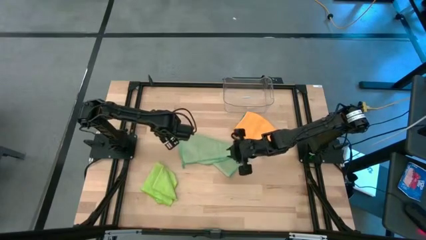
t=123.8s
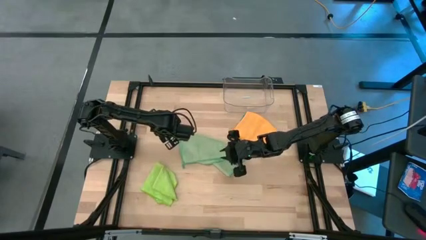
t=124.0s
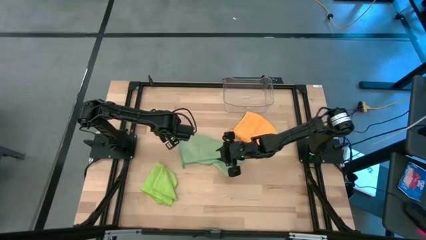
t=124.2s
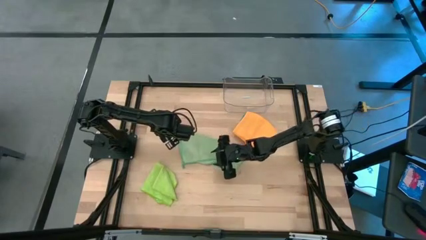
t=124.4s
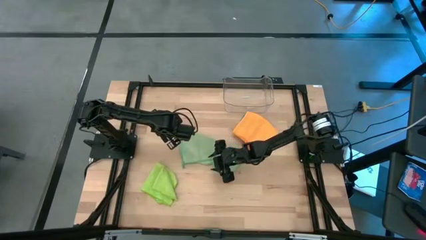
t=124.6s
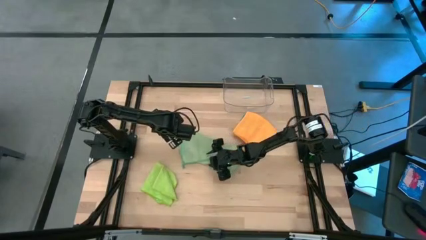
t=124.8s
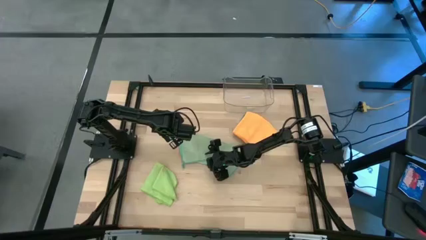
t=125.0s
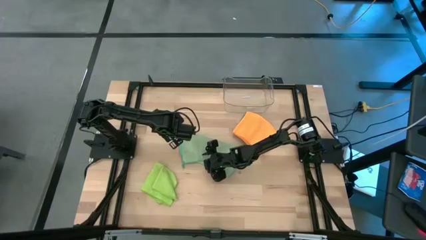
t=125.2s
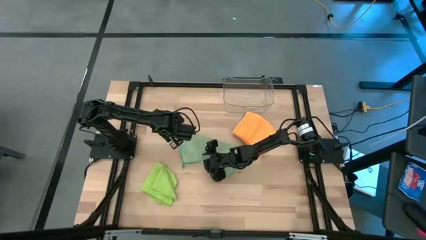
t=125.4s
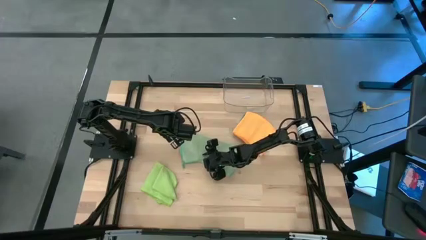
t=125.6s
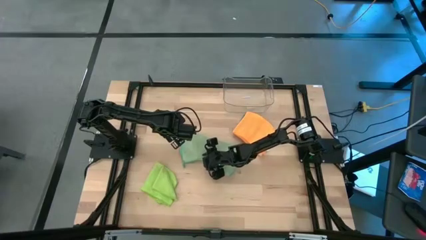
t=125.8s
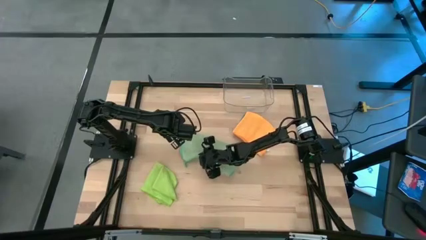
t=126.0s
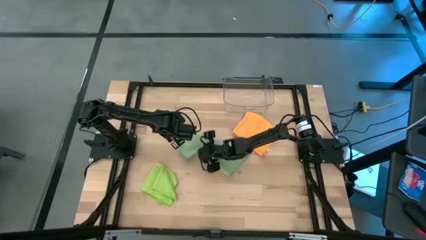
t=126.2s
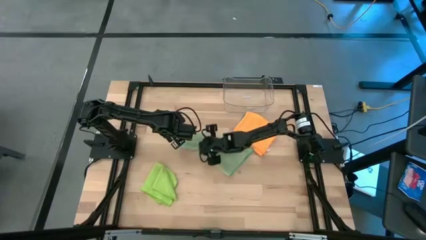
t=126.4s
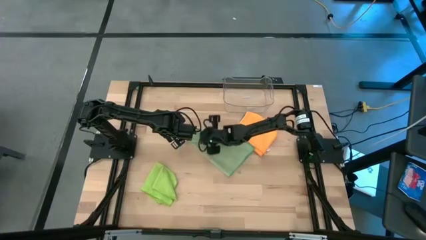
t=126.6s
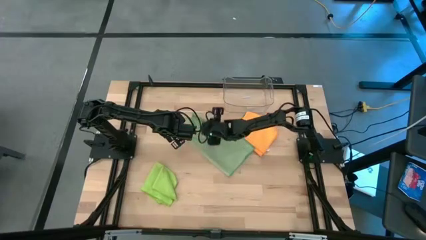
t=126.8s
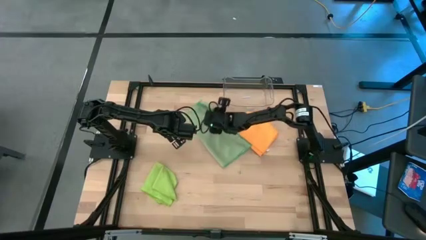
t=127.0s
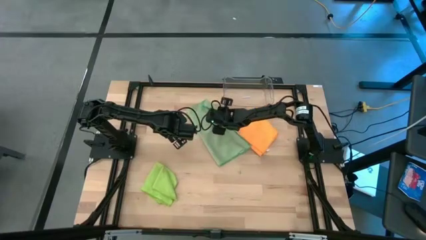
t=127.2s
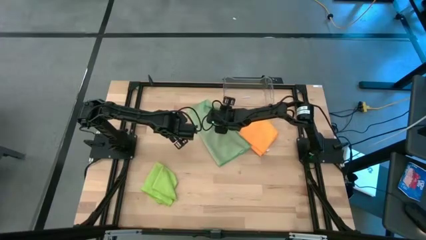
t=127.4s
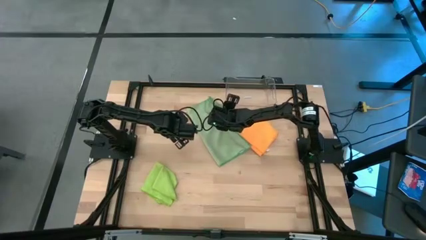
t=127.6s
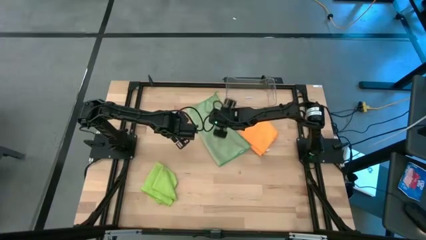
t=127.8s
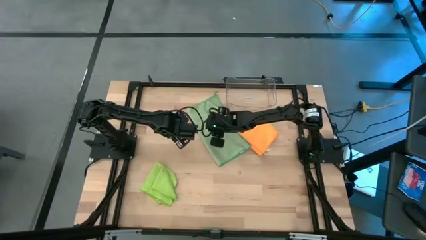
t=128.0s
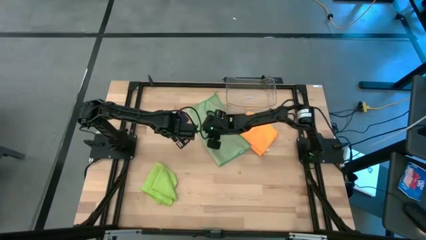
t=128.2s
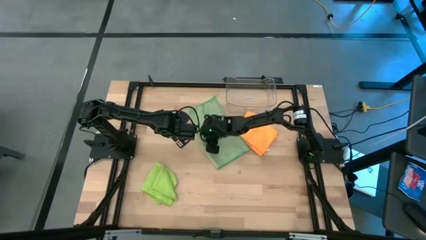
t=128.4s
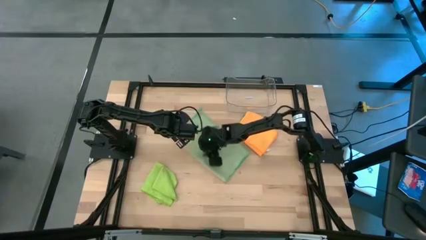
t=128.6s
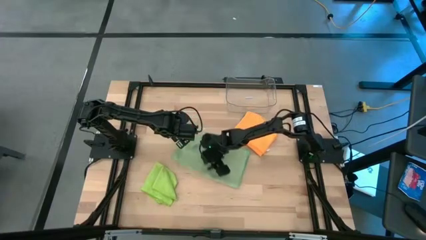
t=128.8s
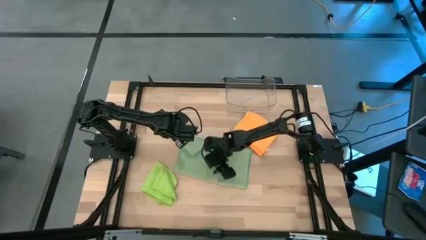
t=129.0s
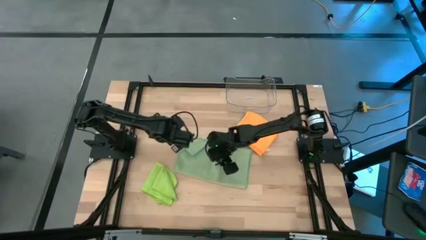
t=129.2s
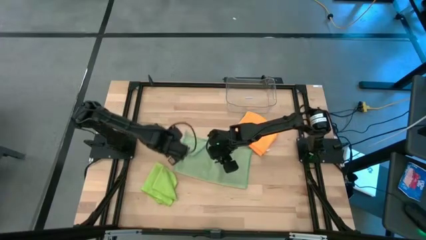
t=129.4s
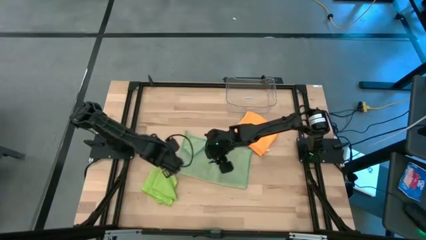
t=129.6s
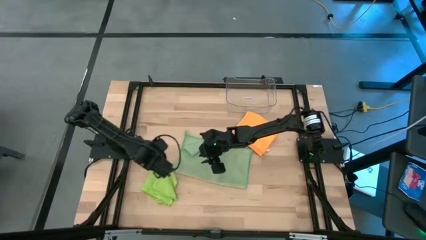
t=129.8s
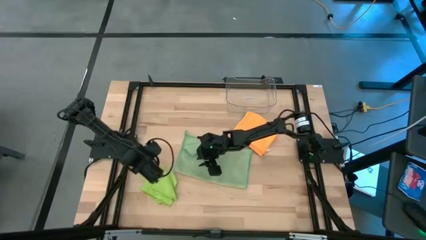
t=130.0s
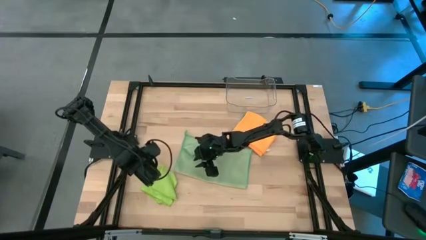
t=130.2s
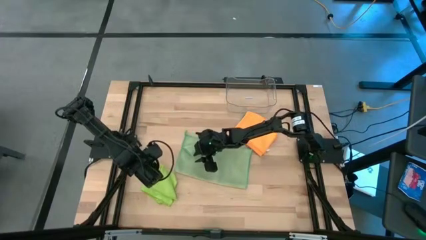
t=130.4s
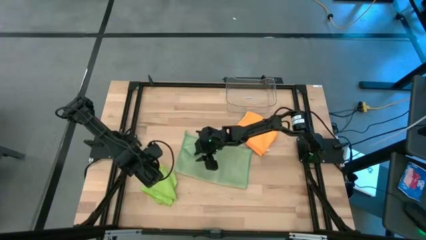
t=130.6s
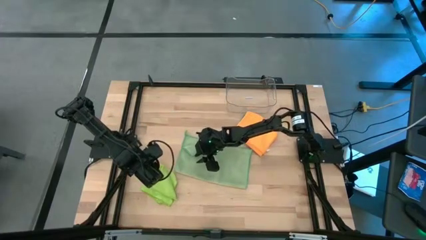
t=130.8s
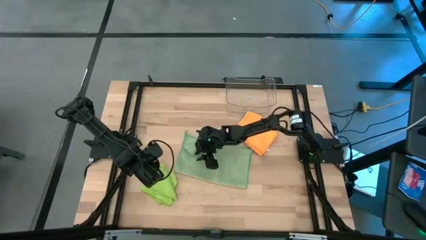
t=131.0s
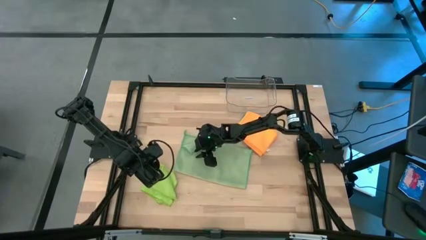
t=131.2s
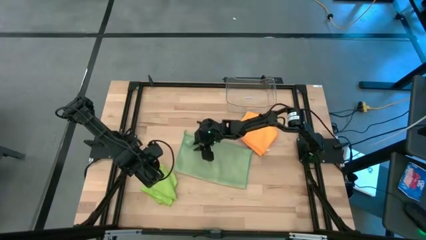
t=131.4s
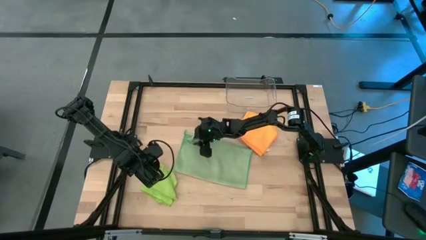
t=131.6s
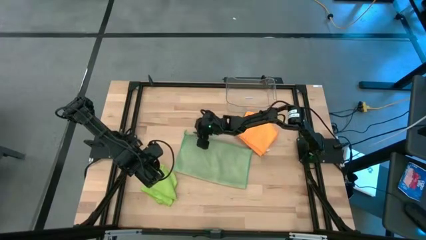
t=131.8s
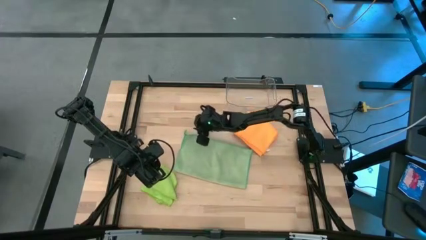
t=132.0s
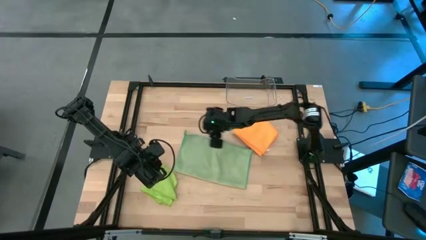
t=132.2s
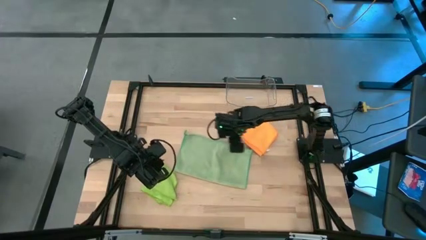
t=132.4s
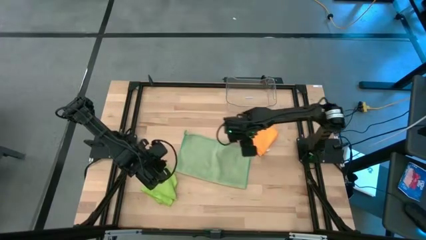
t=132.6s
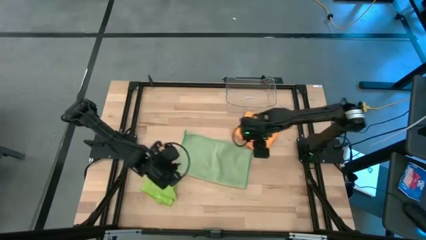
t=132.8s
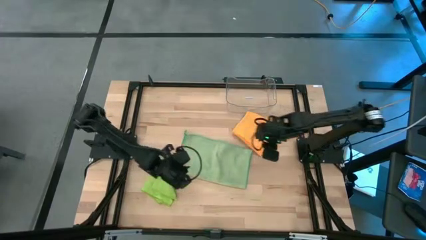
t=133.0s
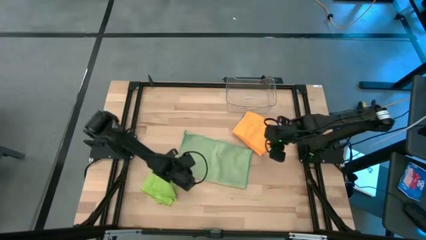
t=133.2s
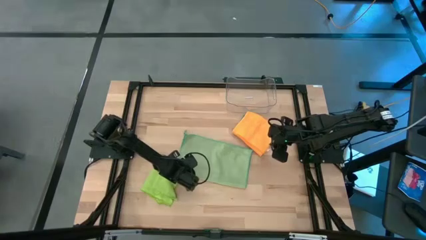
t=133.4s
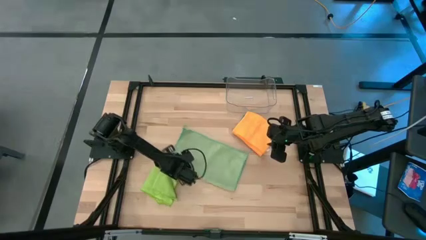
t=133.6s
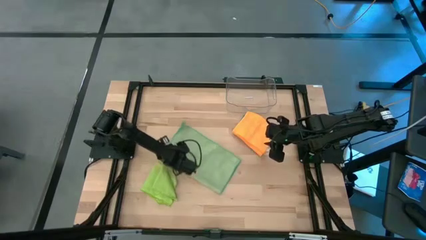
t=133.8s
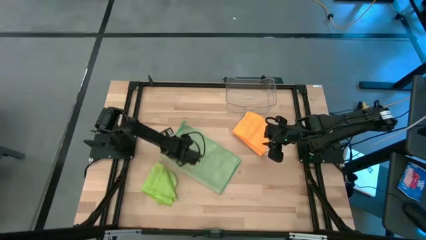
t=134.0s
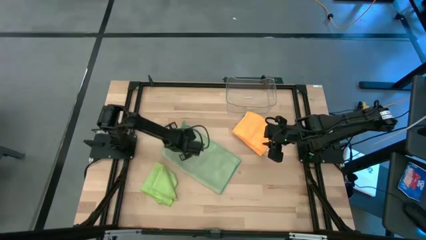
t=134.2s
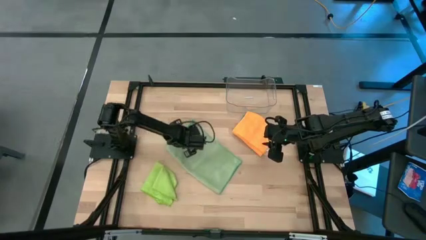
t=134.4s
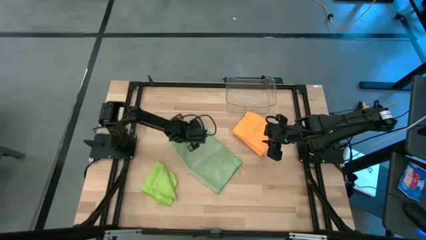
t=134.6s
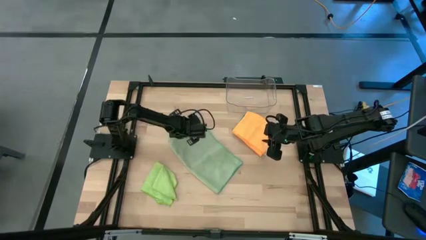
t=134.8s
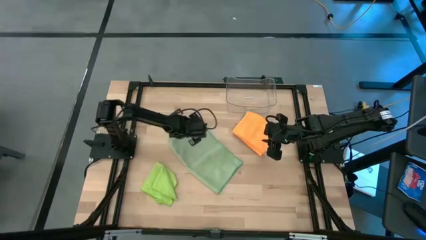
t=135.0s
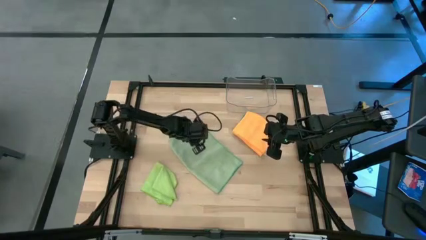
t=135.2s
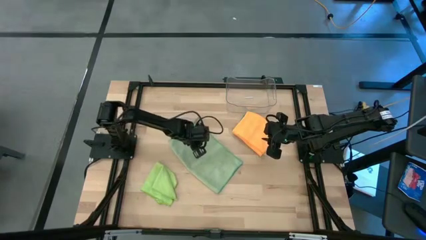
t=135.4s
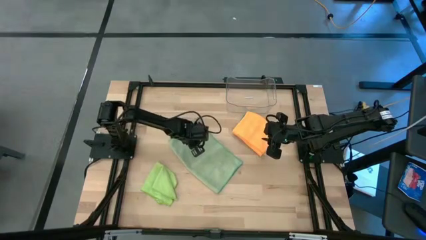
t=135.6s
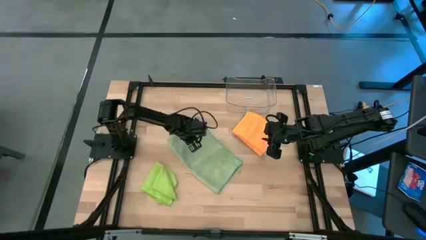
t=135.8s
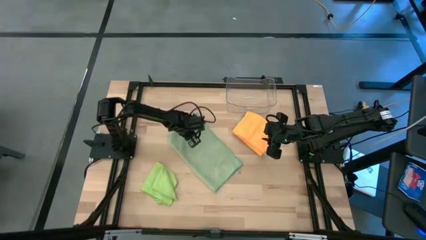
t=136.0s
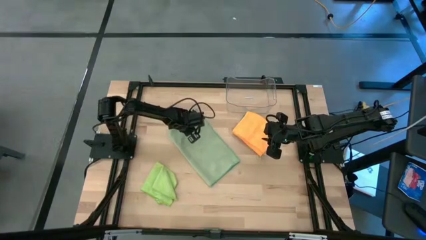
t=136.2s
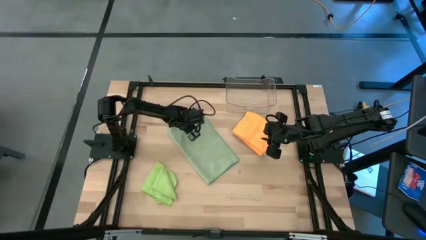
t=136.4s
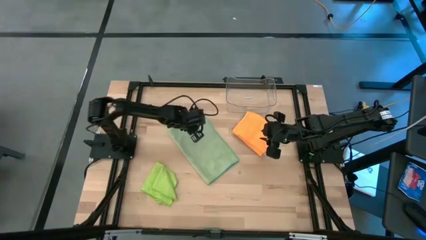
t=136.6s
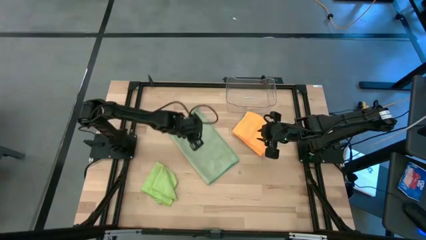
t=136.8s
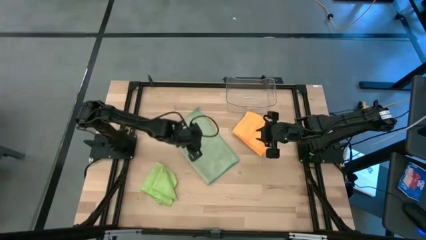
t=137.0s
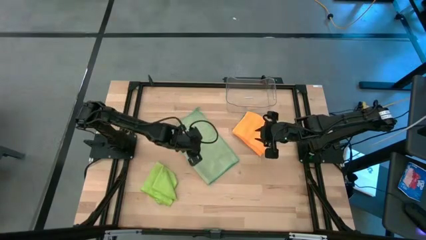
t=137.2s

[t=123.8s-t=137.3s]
Task: Fold microfiber towels
Fold the light green microfiber cloth
